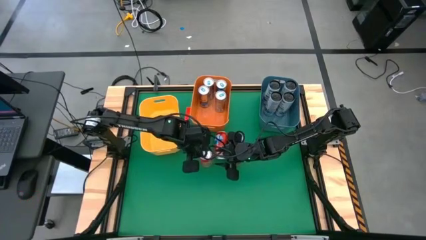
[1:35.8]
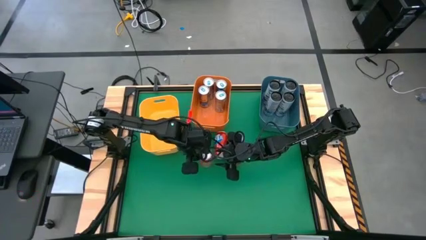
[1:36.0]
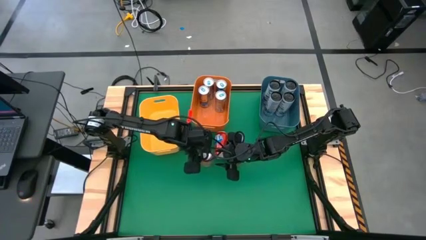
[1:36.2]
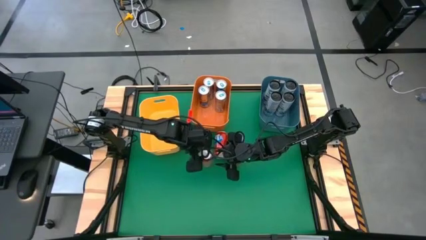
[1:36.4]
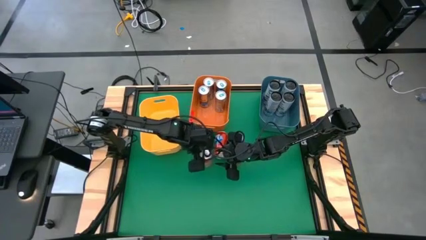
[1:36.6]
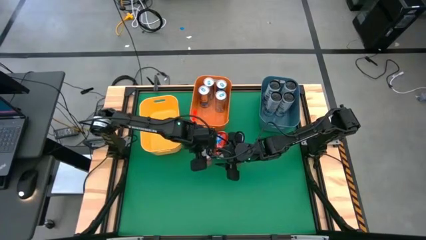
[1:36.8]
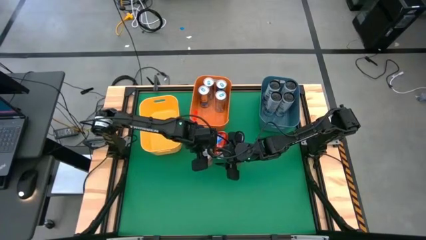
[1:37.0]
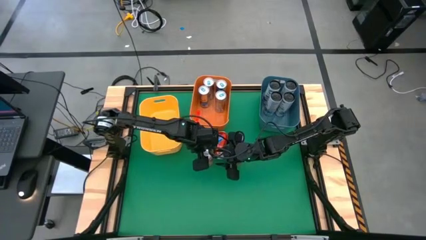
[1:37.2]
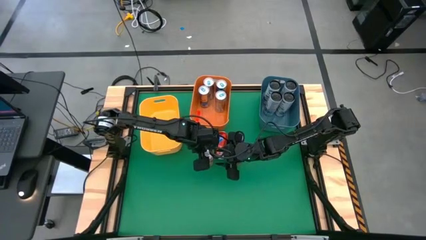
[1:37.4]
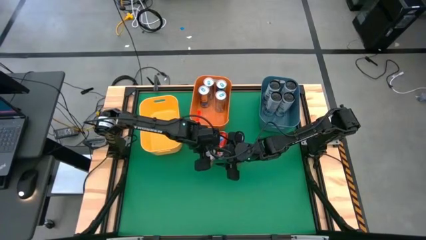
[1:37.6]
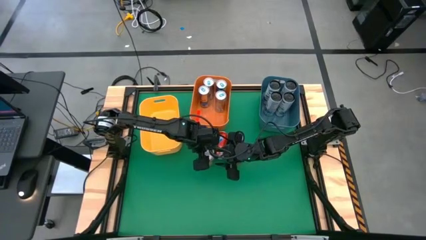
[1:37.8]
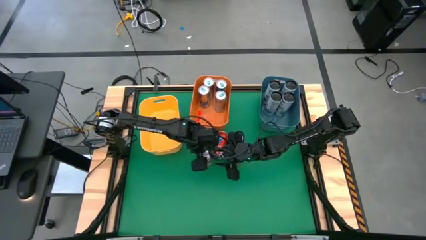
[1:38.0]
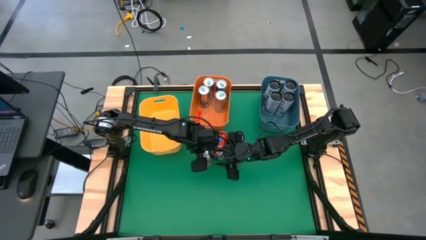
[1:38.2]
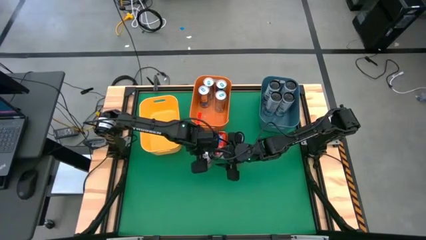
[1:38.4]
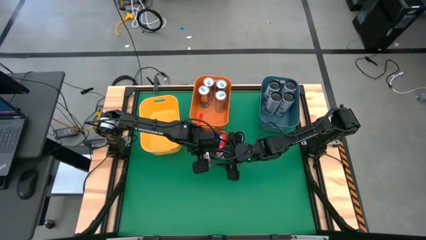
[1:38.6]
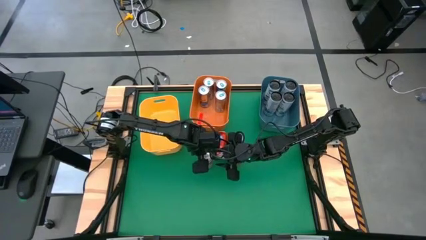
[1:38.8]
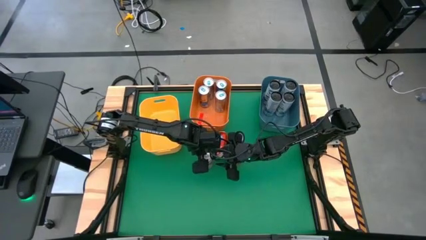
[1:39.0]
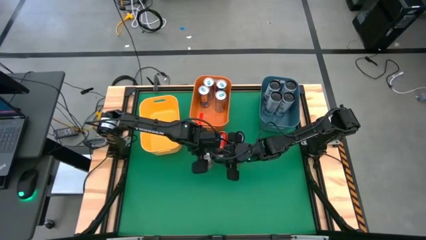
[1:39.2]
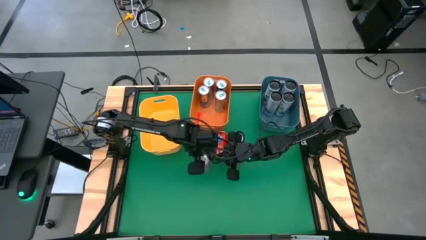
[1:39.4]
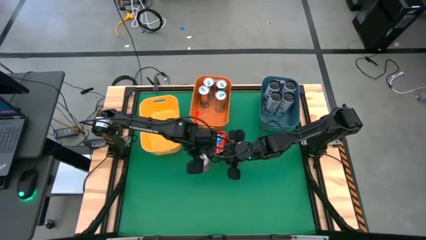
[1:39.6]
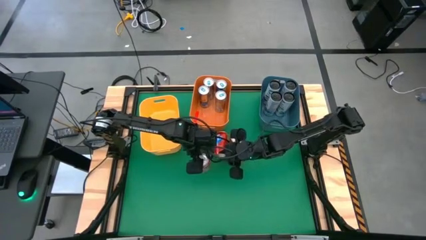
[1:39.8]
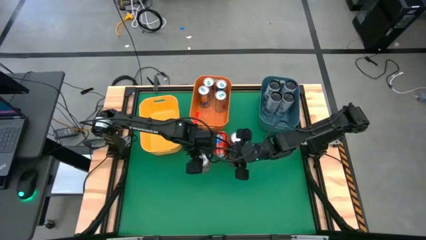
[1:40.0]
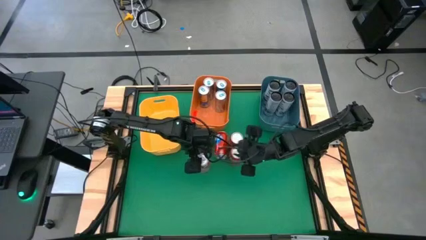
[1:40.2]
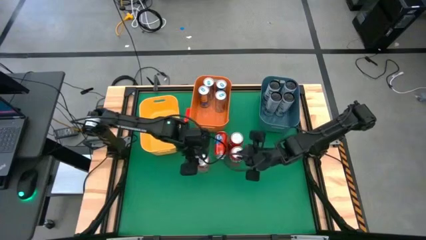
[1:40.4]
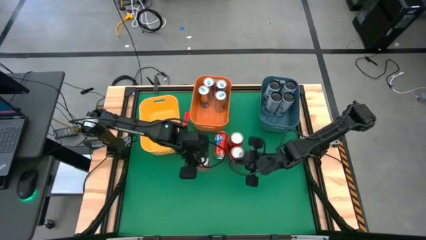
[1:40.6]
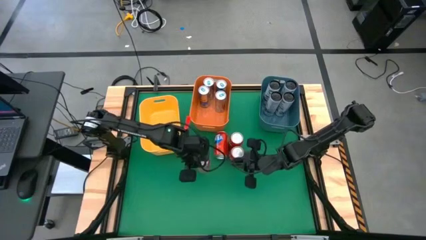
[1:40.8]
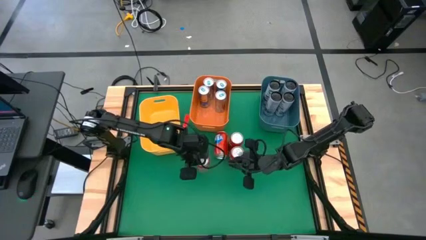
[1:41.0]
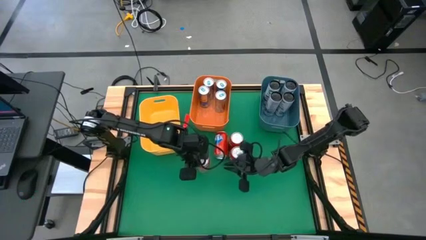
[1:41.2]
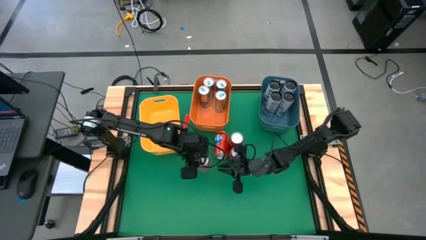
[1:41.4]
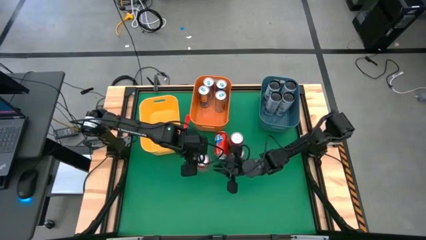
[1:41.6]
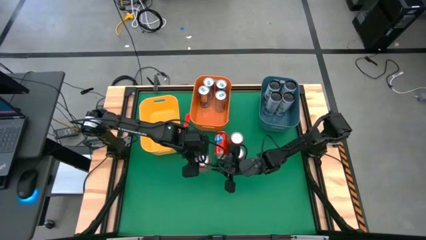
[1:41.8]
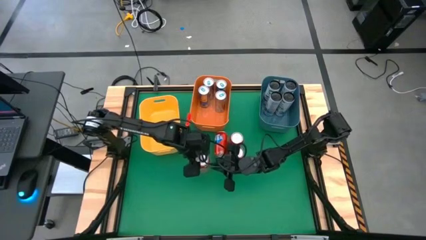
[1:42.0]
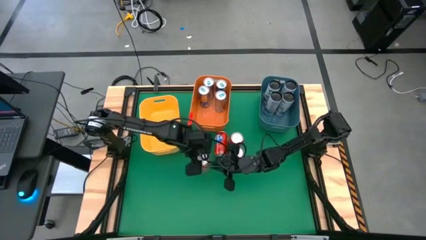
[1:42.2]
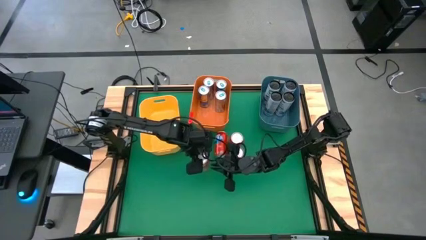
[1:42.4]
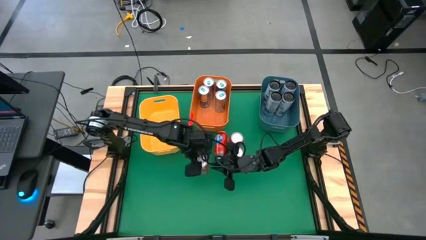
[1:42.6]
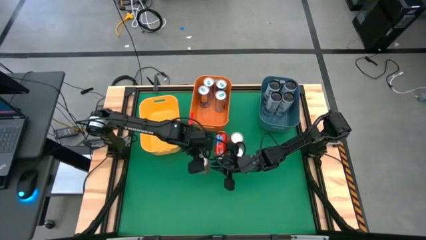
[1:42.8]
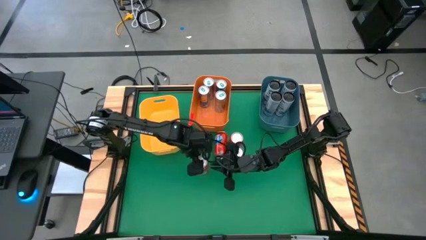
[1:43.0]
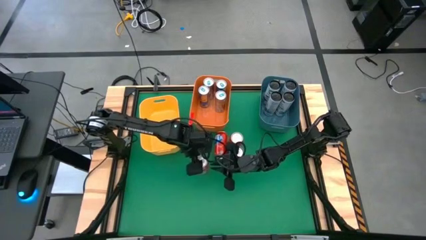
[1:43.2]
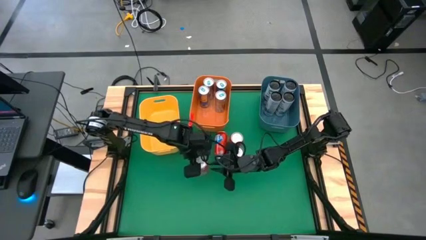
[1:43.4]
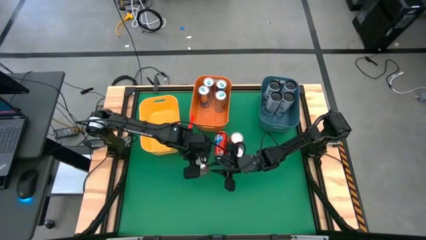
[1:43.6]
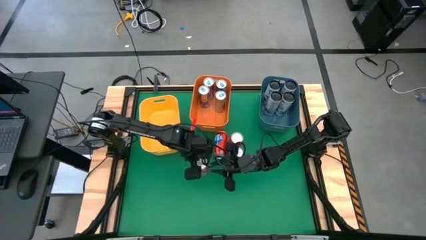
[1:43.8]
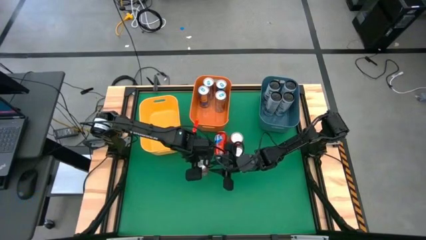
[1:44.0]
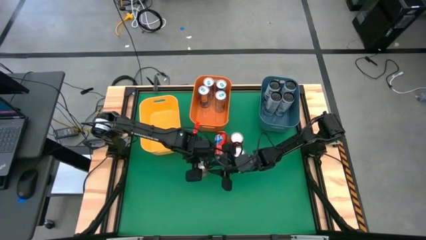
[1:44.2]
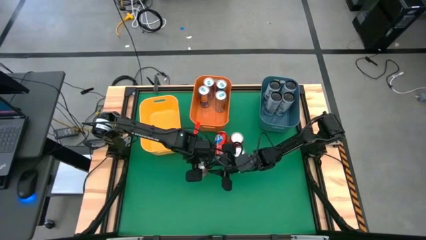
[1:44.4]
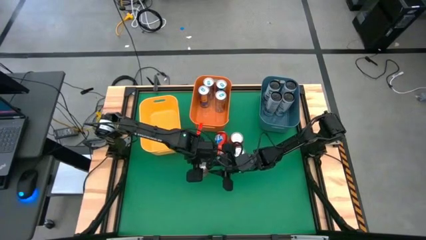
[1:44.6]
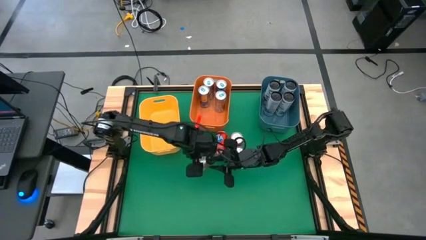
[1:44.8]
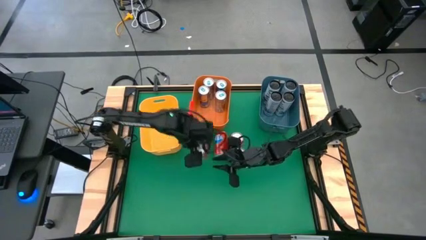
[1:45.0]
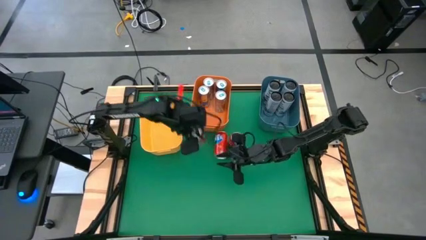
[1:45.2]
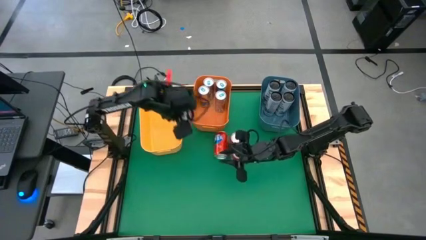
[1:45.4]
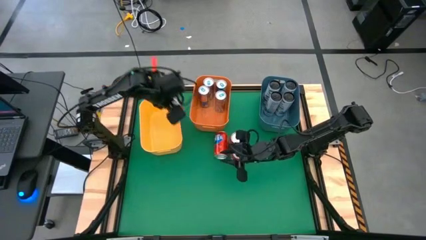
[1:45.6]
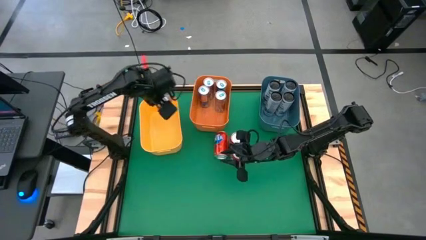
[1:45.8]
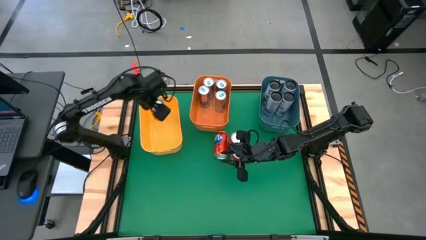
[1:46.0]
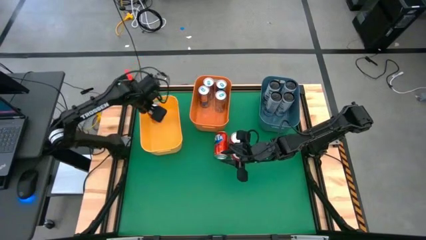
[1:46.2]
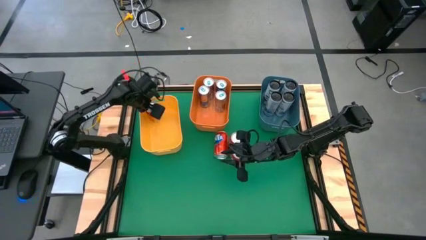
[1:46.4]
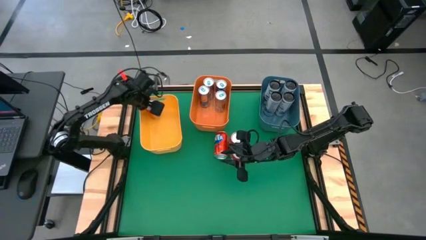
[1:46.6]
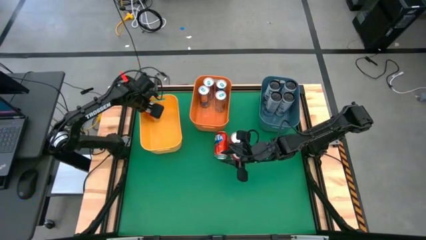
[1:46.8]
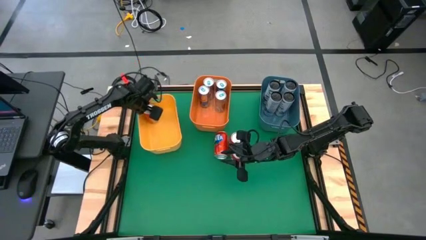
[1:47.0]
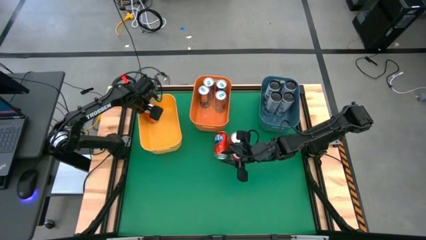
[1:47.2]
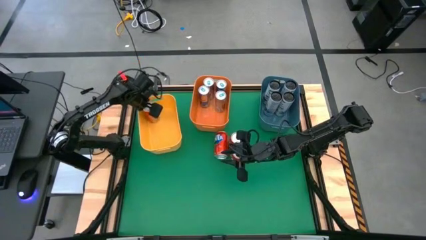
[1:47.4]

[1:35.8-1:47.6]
Task: Sort soda cans
Put the orange soda can into the yellow bin

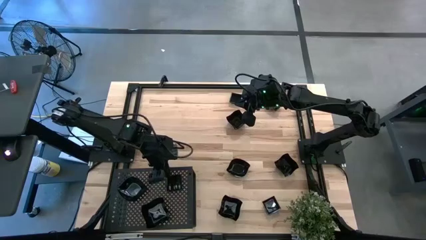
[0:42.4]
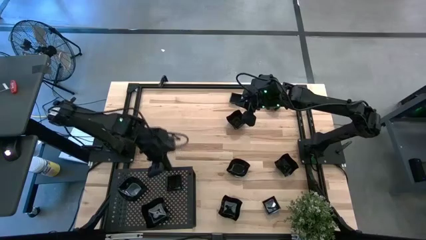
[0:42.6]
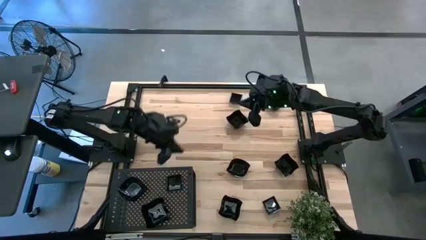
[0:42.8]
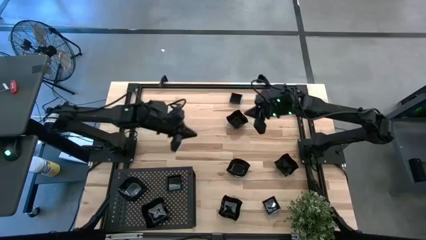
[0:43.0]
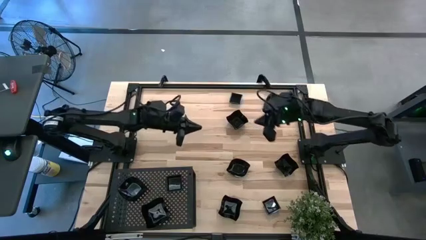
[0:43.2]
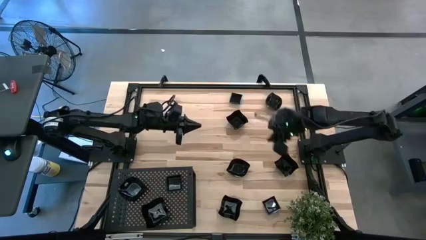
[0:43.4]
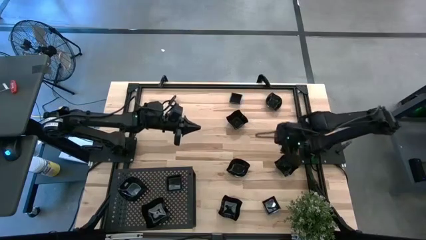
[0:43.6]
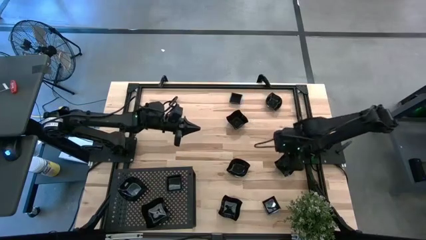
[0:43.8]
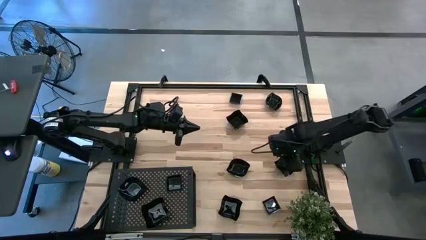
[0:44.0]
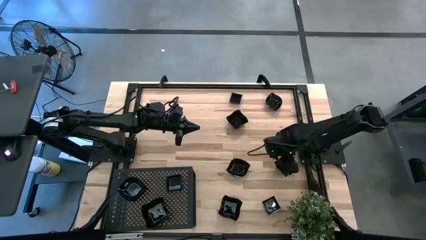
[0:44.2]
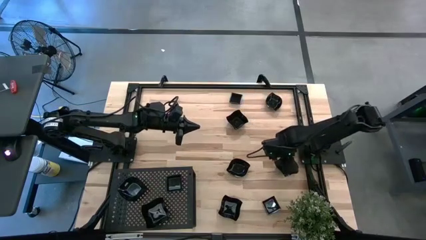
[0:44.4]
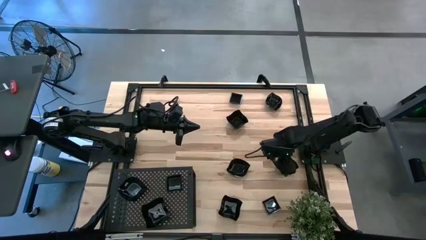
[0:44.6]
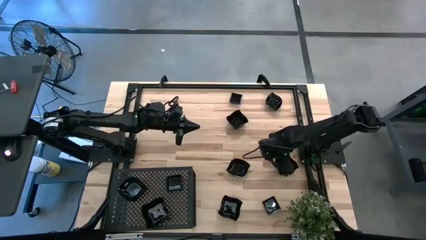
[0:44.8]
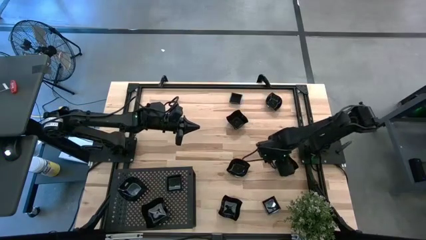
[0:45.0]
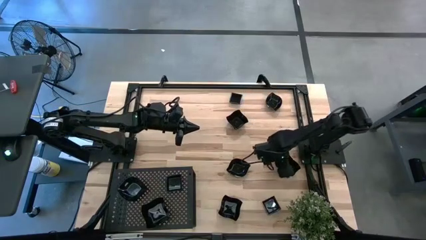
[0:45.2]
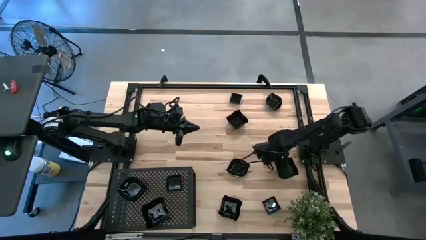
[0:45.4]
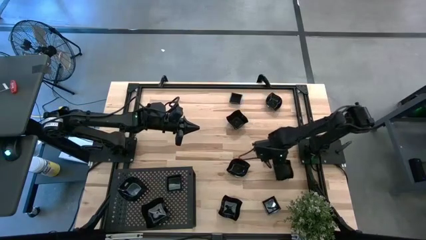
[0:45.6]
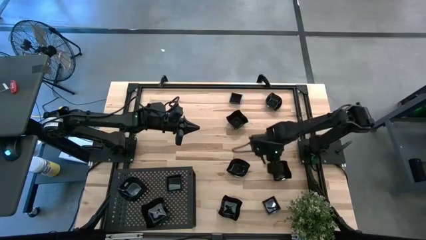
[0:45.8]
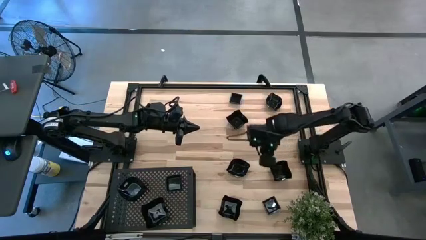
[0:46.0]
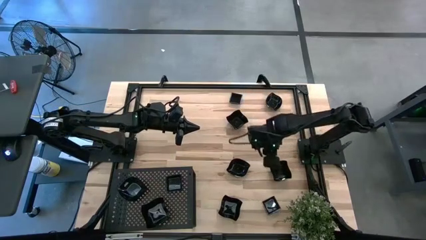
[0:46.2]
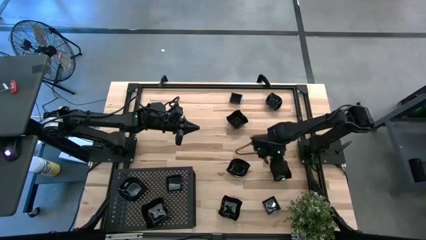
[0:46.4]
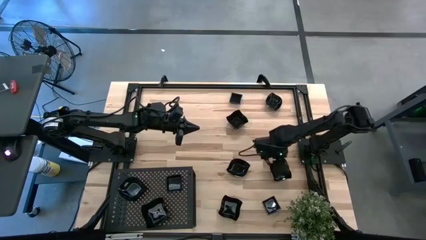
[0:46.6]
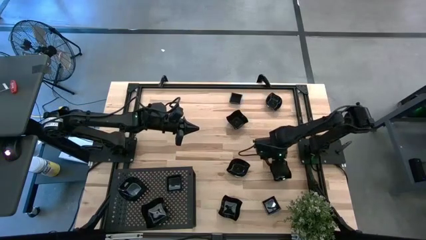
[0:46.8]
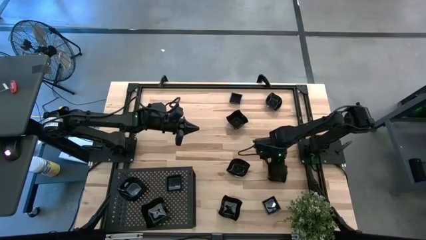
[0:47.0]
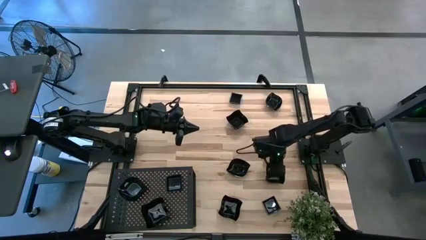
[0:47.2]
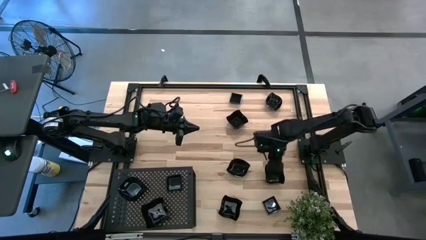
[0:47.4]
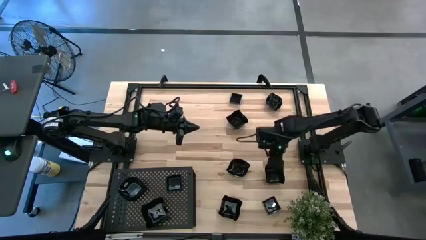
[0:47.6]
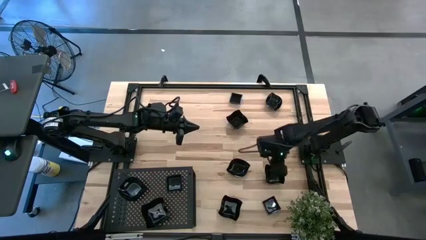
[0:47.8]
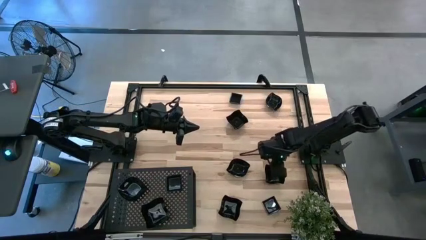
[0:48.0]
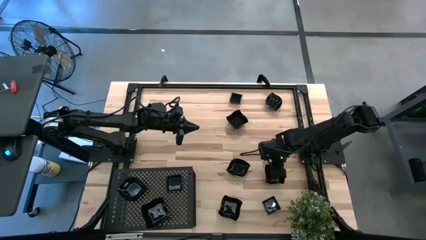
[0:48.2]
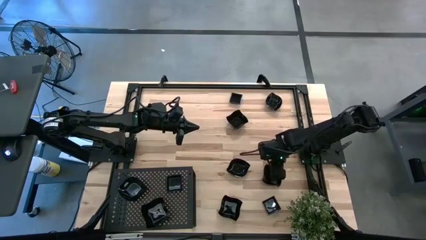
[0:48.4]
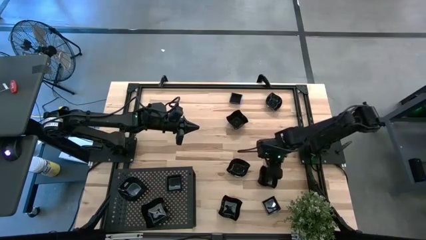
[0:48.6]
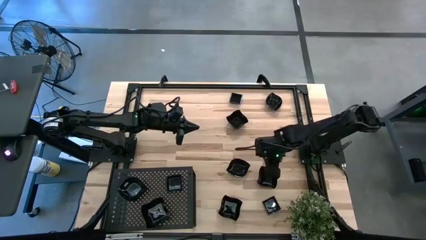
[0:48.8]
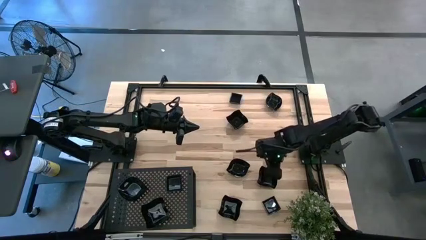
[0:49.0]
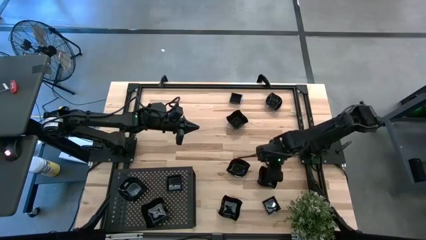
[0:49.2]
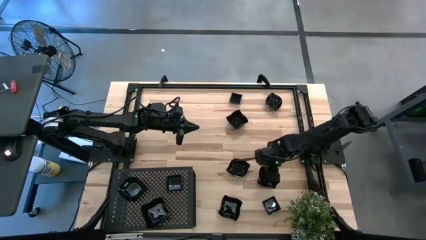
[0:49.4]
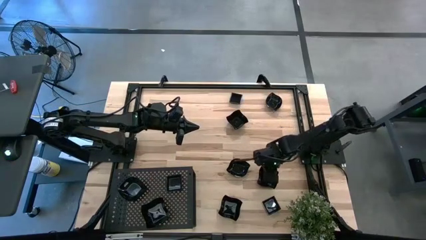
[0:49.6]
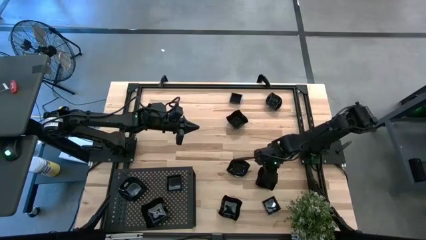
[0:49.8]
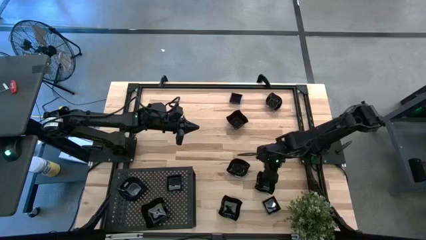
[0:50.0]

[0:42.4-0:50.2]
Task: Pick & Place Mini shaped plates
Stack the distorted square plate on top of the distorted square plate on the shelf
